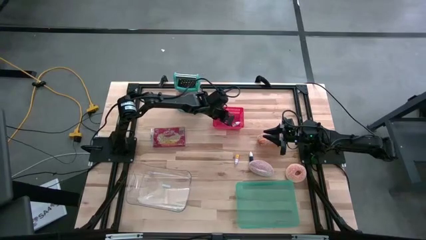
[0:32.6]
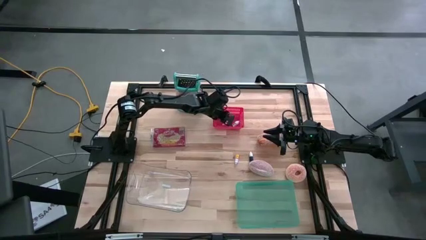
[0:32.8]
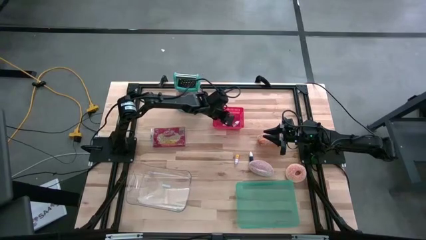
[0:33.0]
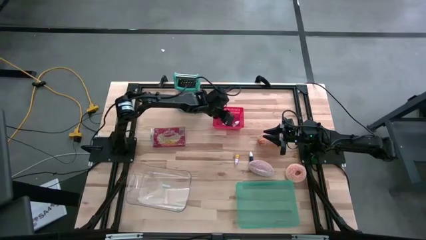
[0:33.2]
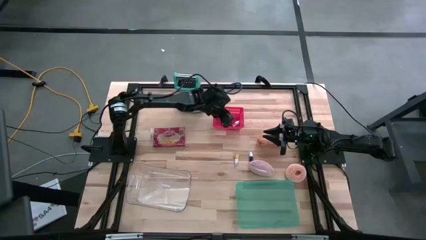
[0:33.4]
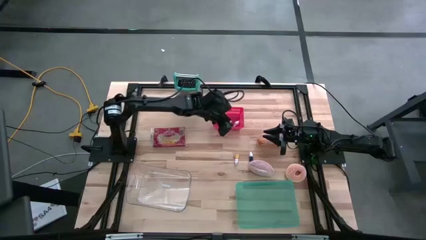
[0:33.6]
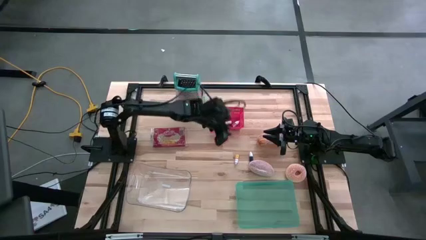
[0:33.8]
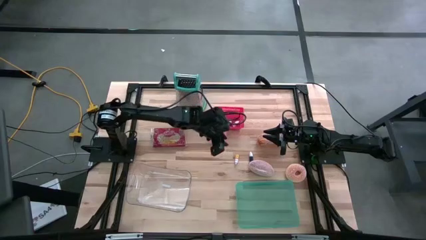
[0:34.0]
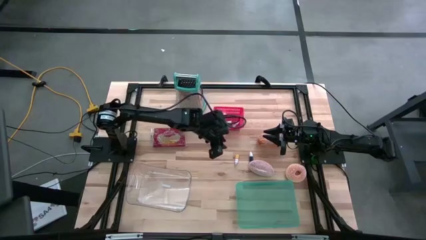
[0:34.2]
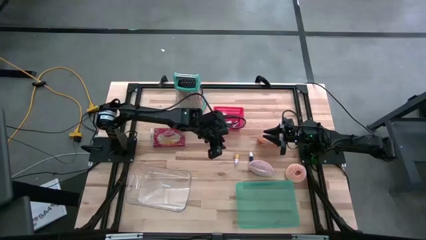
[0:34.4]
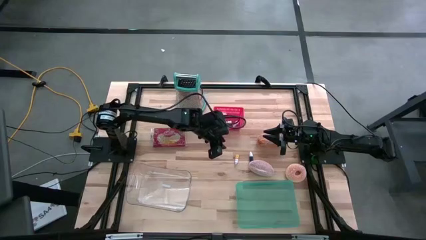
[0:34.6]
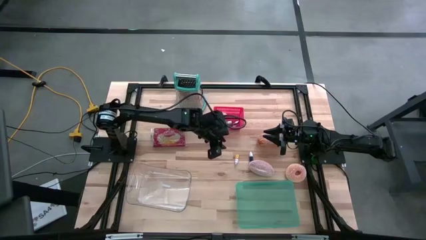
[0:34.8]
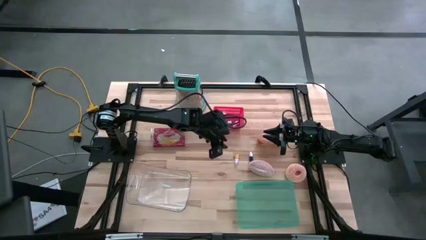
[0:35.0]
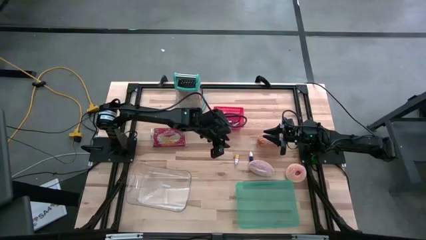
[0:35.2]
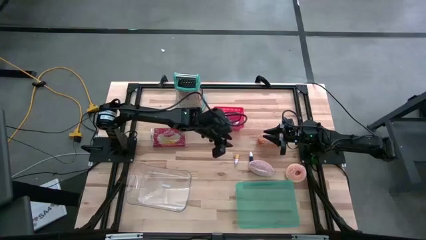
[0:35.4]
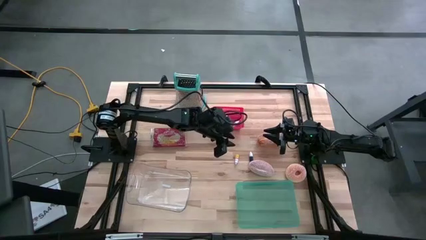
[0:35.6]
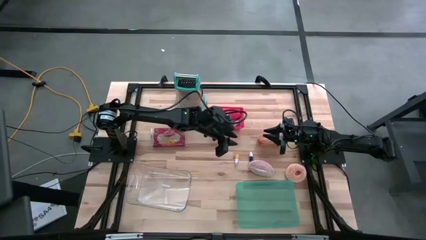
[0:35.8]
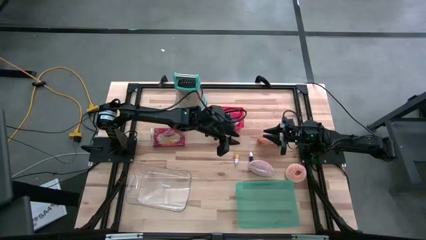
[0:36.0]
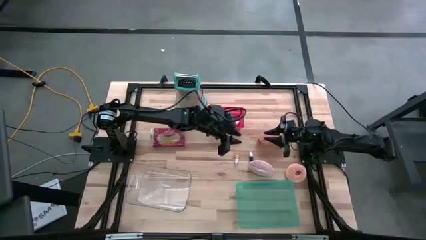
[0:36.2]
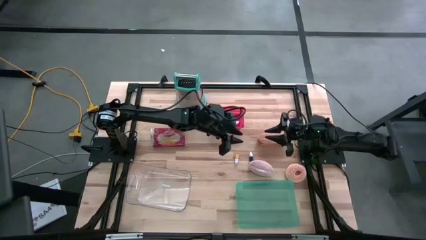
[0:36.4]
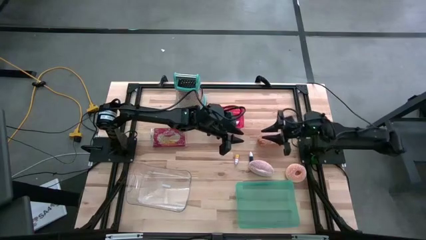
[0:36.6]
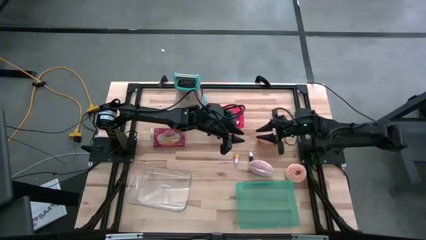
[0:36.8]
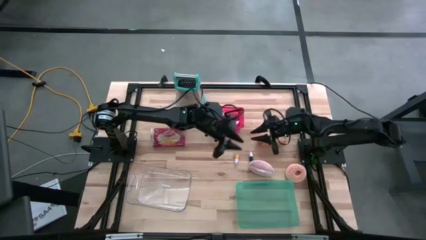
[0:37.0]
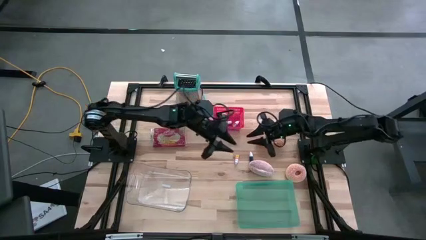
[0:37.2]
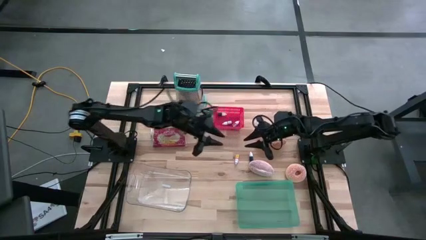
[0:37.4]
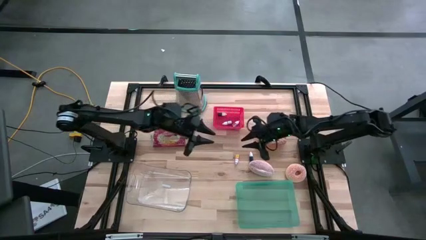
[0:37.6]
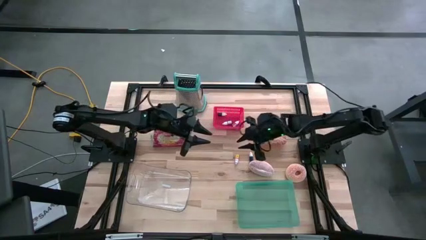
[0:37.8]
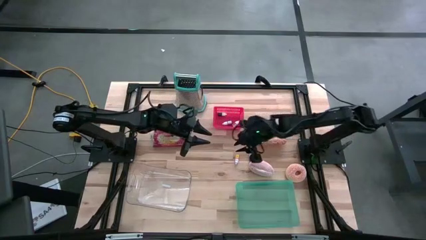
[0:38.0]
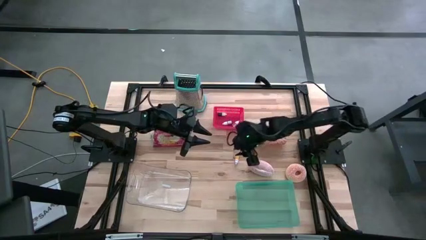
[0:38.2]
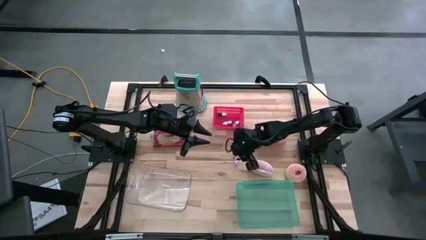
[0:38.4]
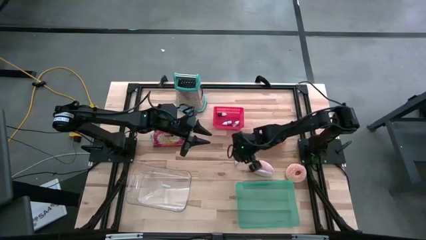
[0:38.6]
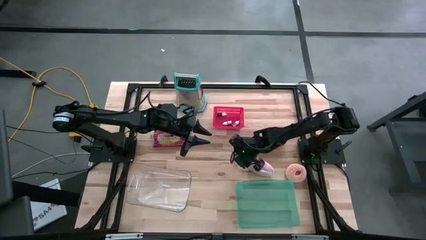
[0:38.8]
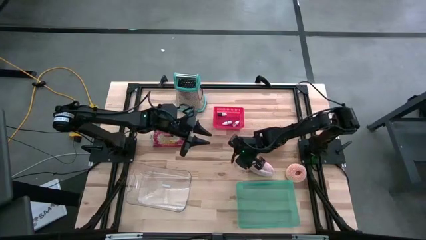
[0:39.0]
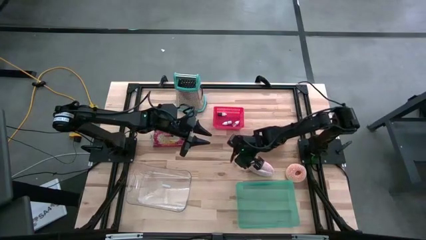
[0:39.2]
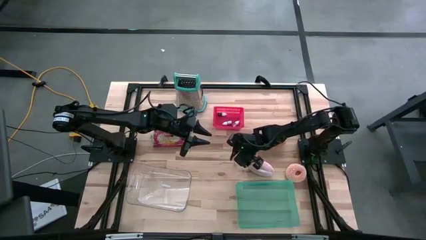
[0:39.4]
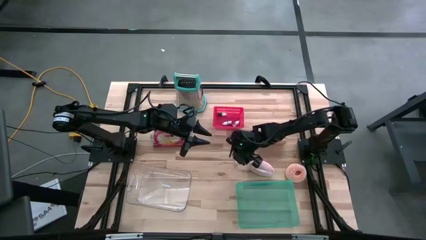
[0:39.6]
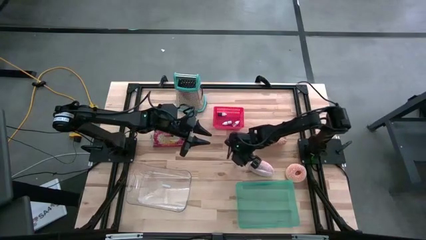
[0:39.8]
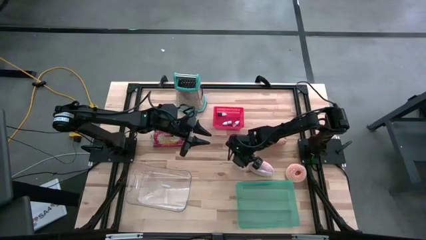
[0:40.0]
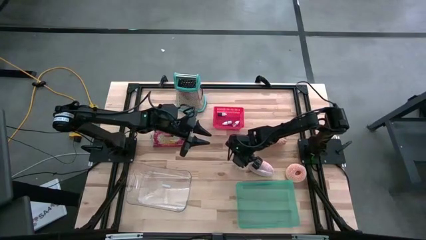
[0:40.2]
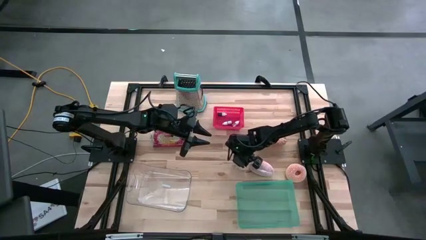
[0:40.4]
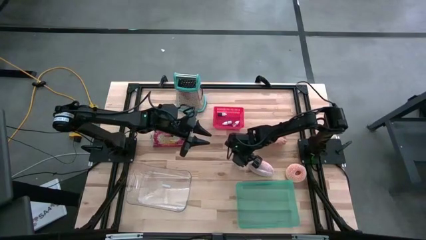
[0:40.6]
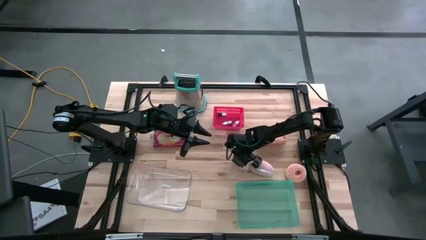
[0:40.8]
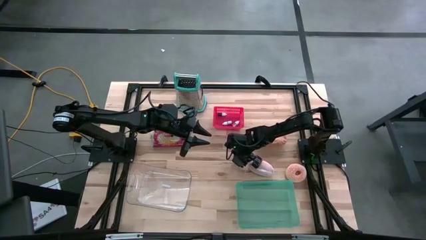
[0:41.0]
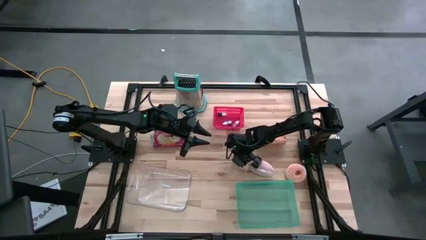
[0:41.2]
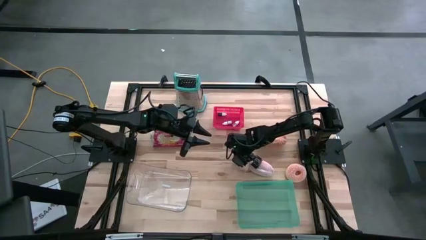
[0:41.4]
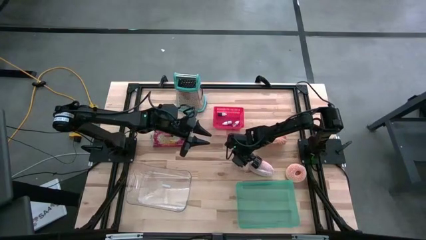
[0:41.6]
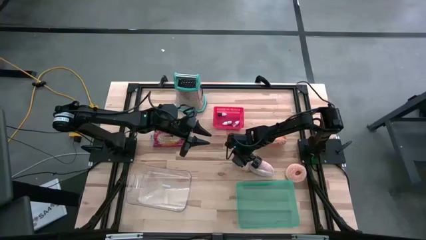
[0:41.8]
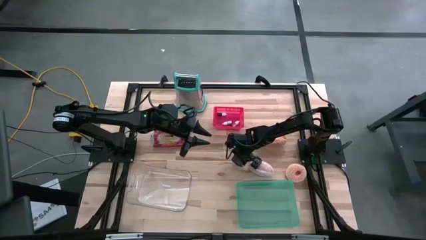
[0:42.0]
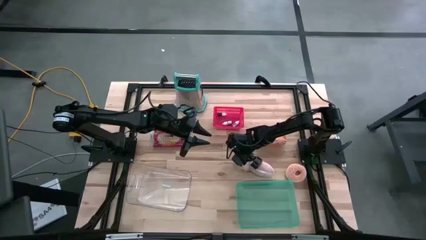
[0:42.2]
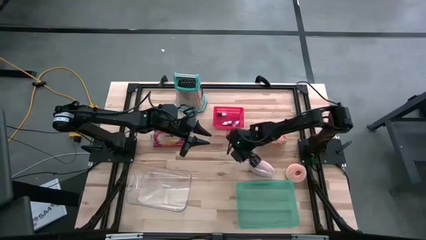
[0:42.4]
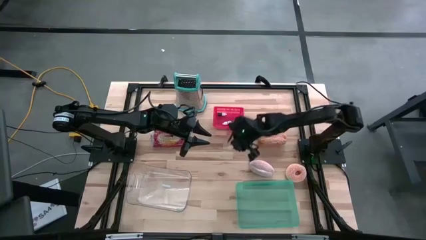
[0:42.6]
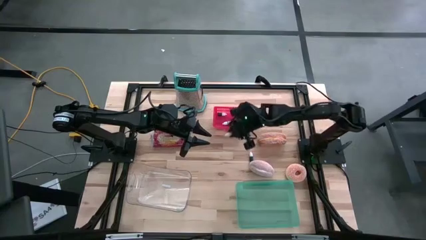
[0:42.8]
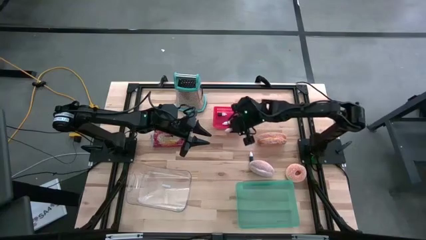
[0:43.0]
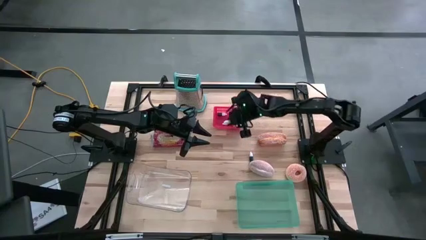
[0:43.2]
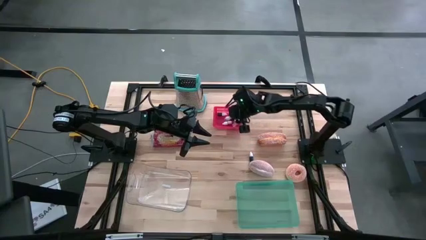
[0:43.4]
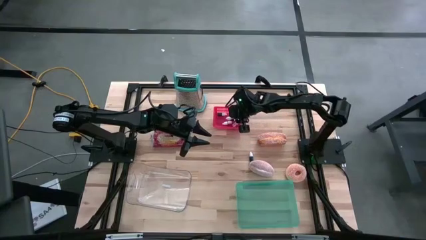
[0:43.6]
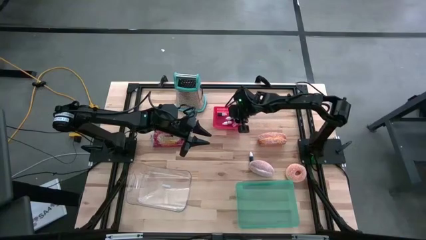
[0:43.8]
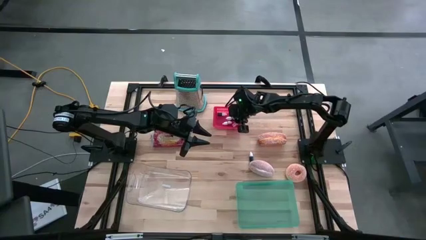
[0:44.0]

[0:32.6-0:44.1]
Put the food coloring into the red bin
